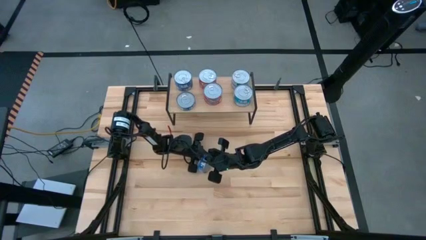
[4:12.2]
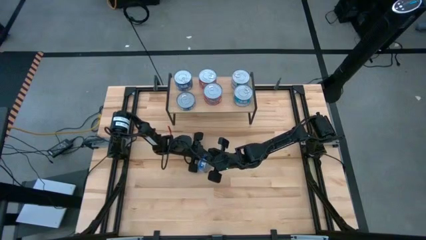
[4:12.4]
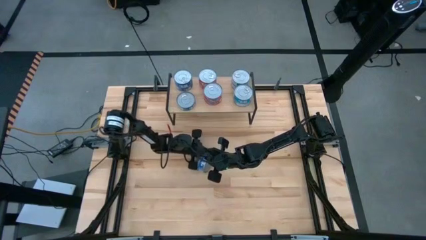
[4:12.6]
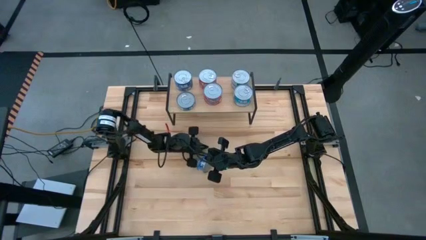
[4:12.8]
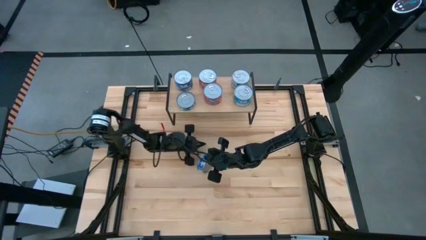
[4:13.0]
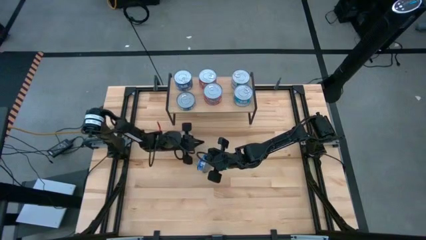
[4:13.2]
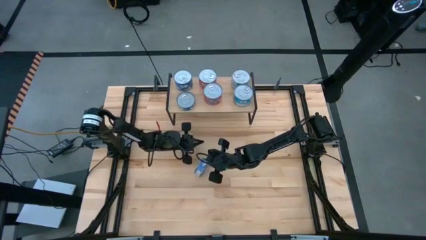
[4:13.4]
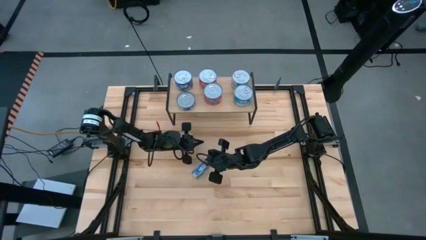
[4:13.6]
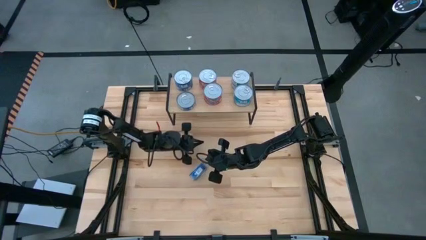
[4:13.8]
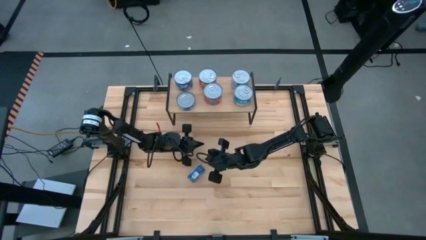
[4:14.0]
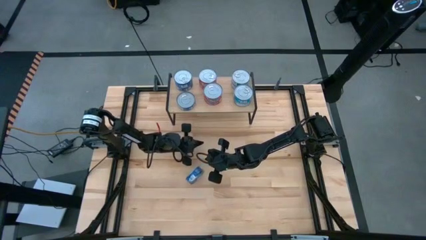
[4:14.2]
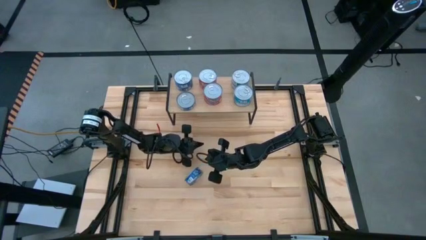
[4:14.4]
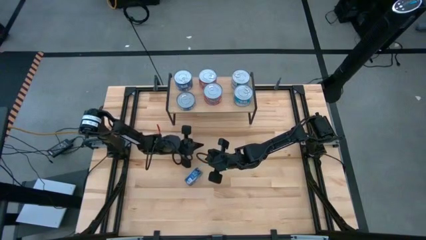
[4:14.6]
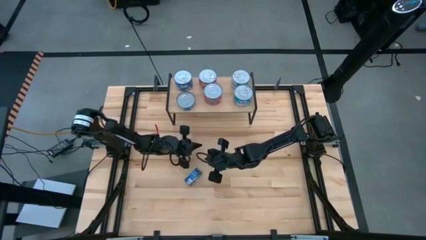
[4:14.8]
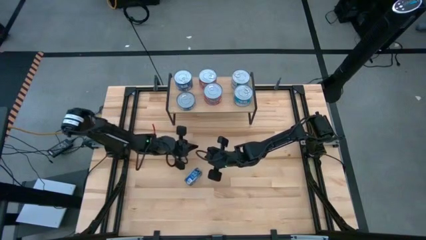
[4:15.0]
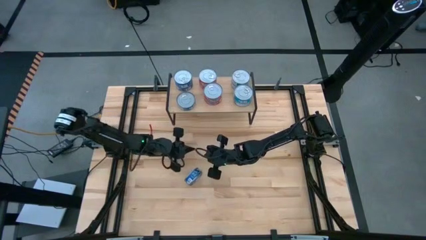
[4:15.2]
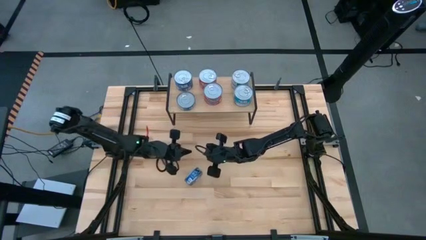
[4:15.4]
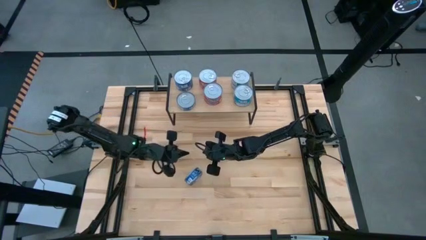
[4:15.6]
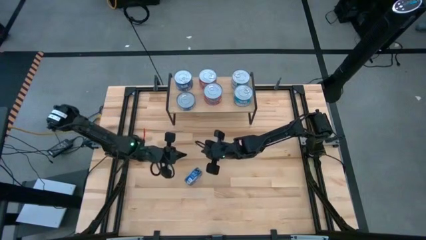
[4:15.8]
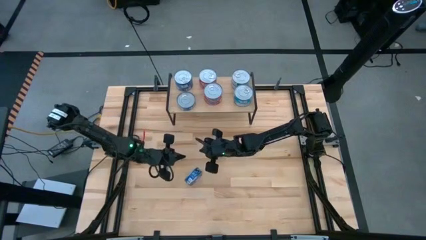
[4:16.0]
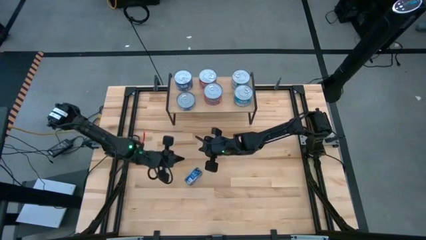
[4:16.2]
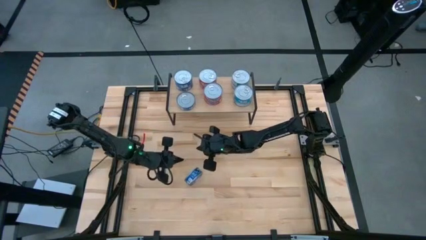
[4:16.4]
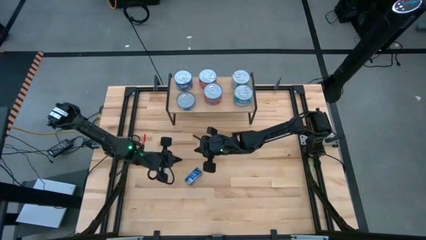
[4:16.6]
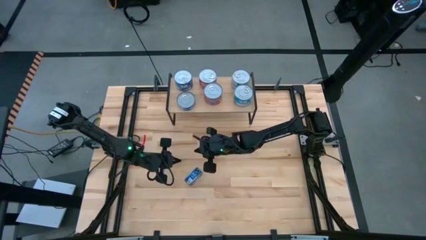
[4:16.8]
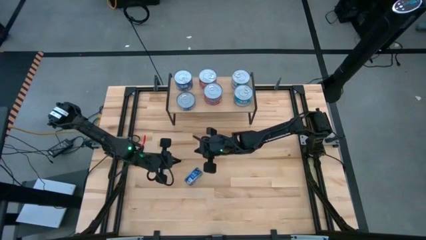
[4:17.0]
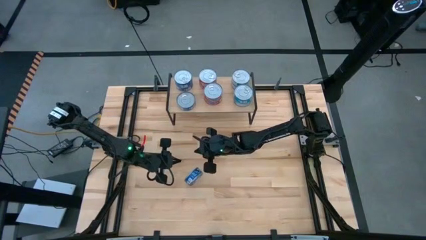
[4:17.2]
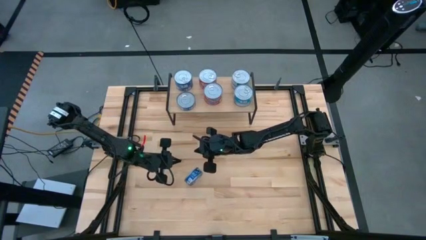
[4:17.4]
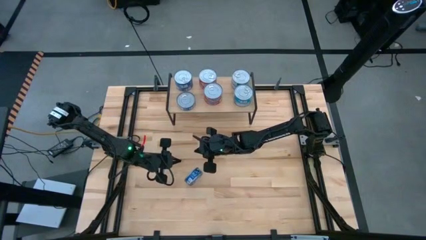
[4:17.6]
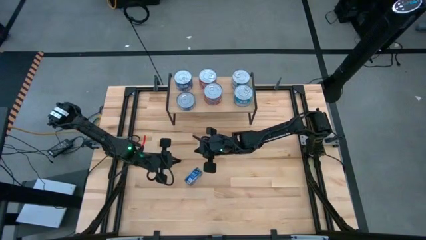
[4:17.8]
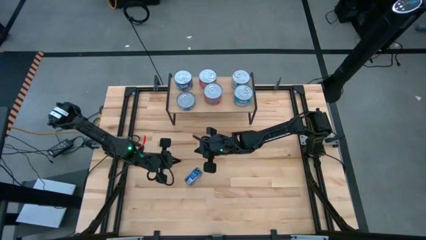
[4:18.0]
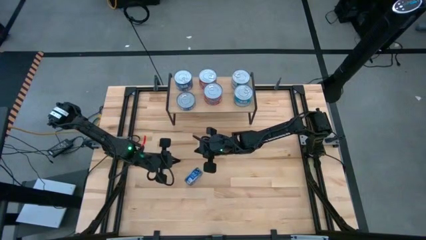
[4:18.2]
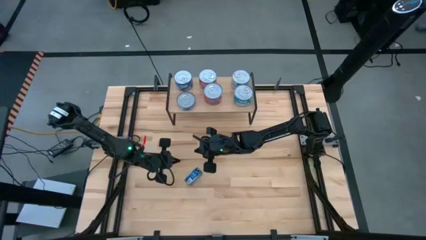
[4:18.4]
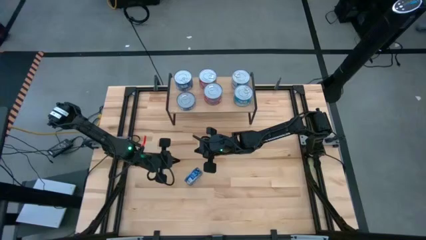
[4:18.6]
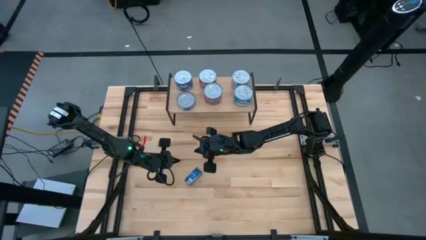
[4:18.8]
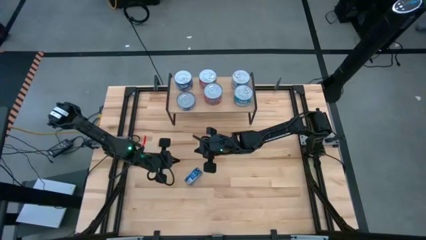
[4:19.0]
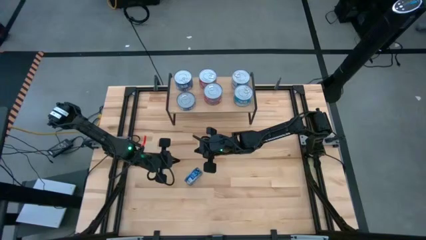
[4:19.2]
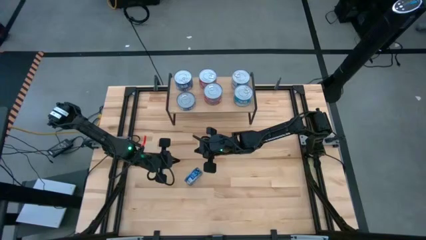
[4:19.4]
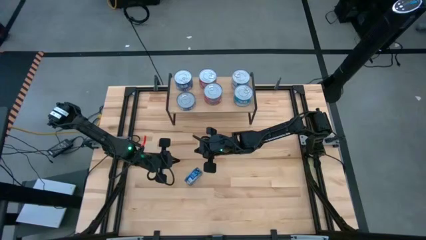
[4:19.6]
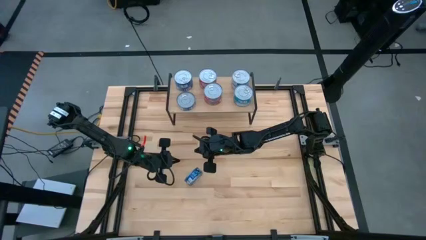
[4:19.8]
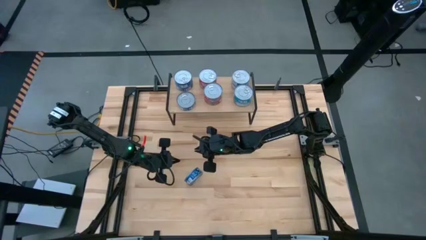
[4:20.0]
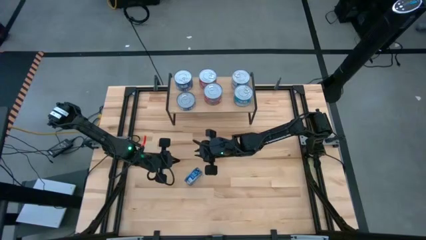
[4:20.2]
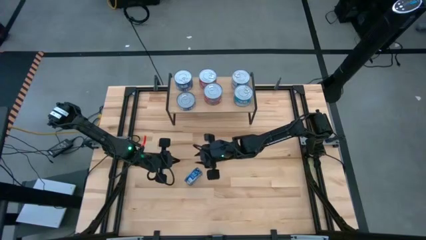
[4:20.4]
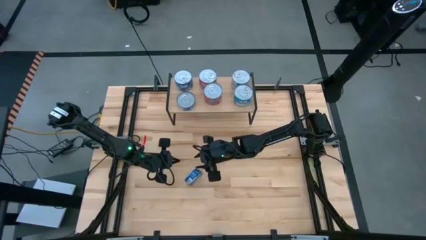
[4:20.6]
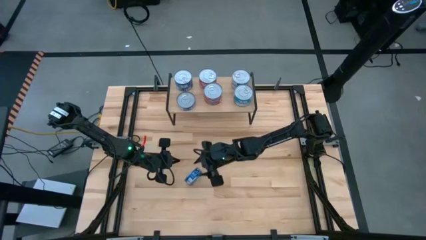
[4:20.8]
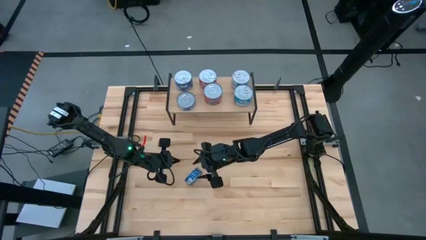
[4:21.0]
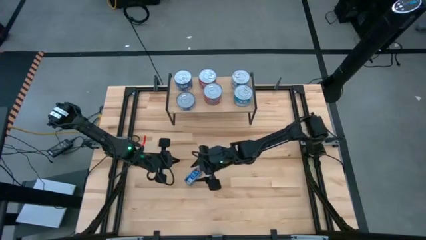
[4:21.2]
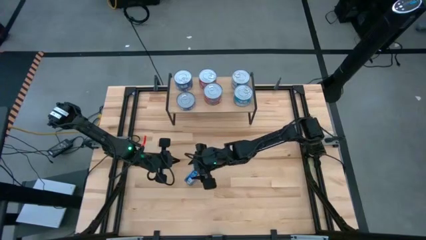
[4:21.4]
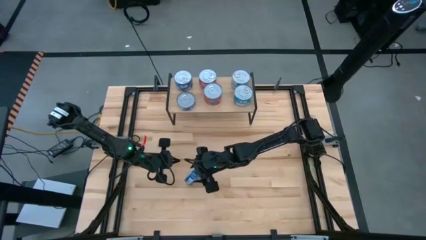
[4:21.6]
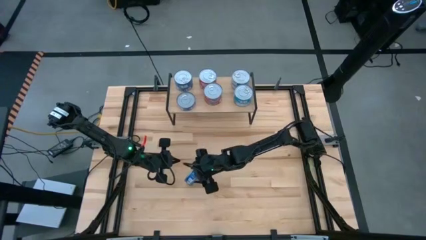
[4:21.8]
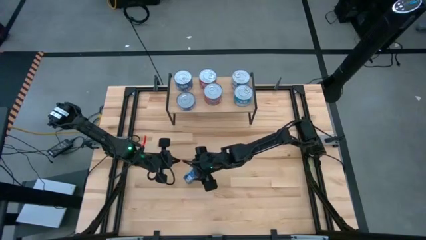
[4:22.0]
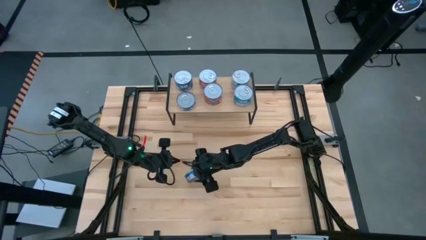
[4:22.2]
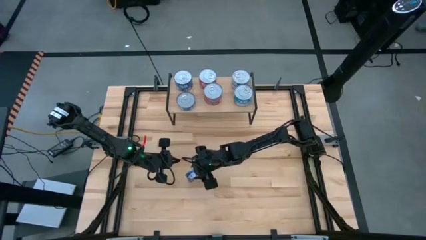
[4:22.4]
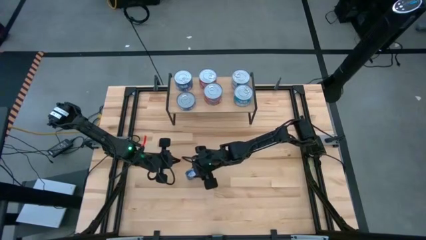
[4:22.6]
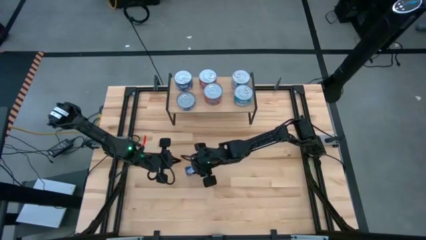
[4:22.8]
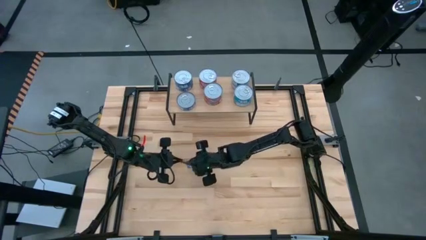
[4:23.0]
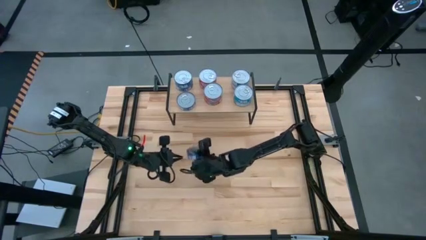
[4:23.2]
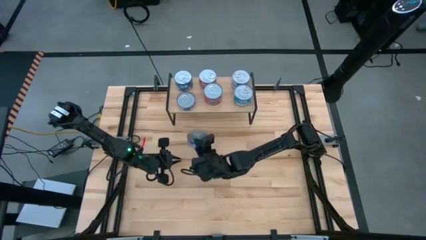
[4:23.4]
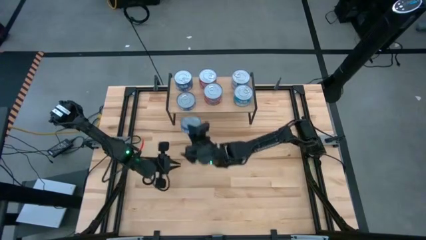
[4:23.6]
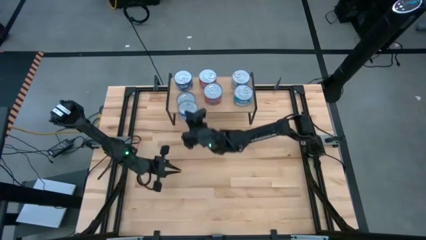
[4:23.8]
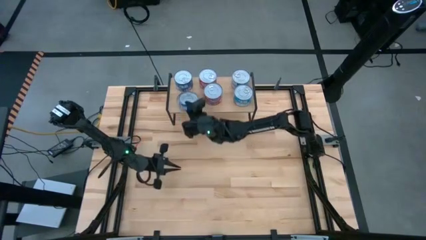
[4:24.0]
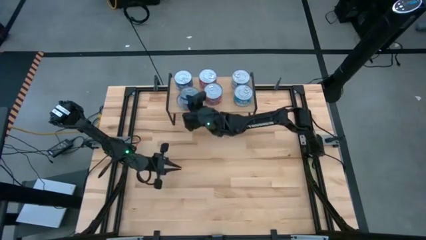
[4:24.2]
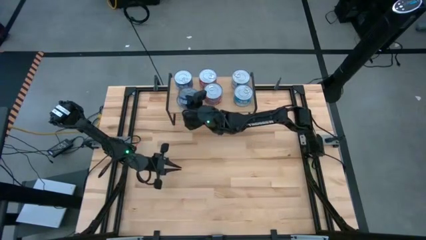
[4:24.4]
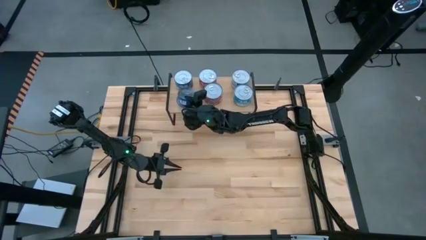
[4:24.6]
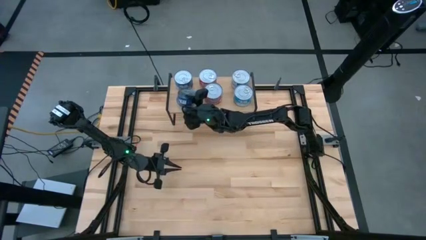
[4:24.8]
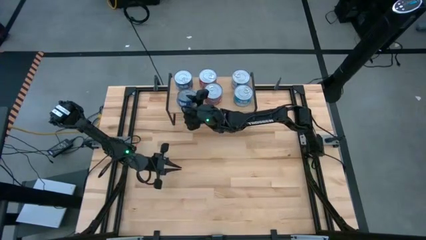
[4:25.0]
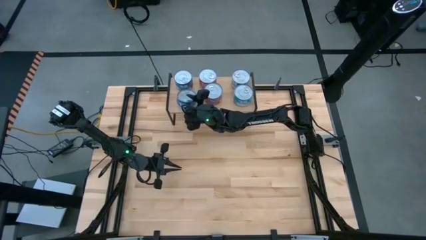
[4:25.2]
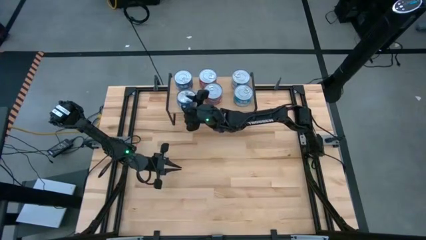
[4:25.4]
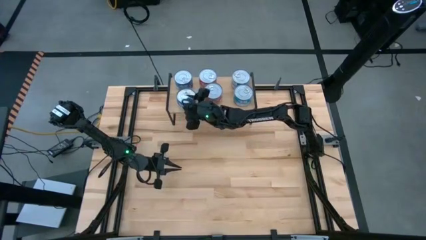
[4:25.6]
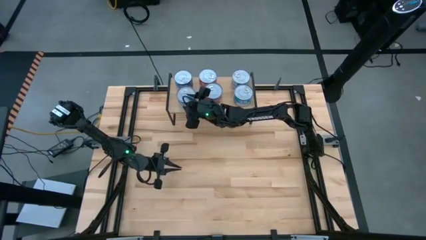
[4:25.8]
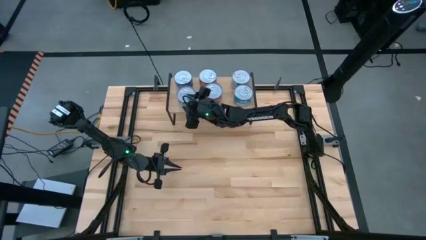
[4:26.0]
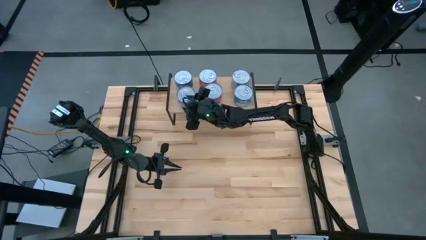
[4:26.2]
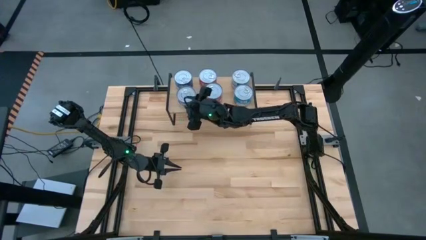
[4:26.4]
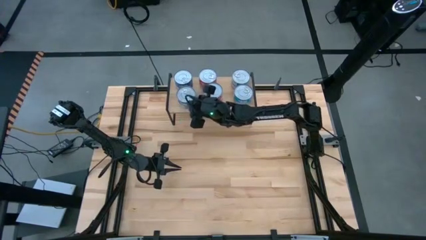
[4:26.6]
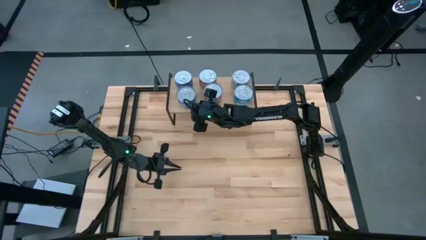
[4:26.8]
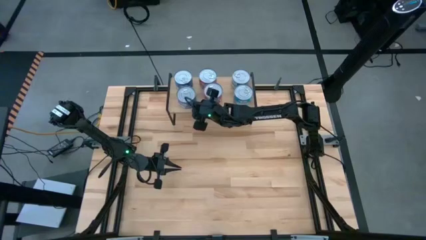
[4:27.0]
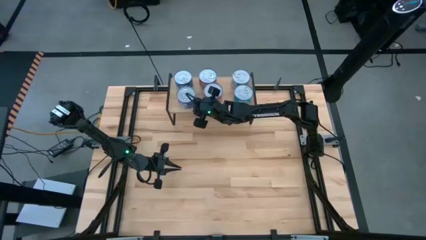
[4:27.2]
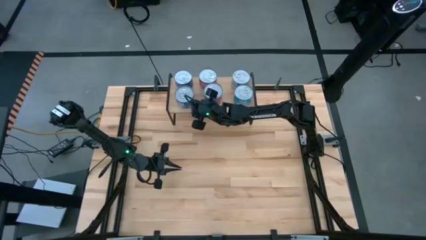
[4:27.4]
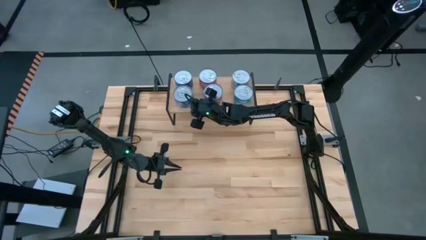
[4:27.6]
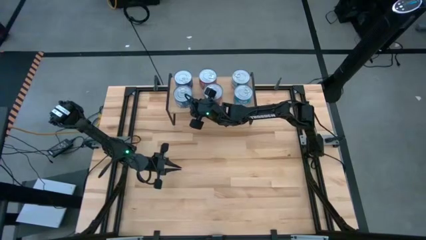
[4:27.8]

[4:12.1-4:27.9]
Task: Stack canned seafood by type on shelf
Stack the blue tuna can on top of the blue tuna can on the shelf
